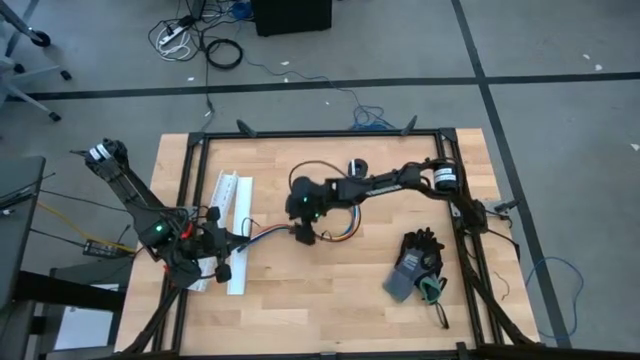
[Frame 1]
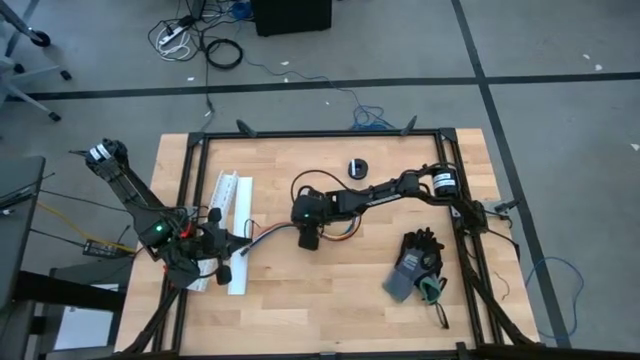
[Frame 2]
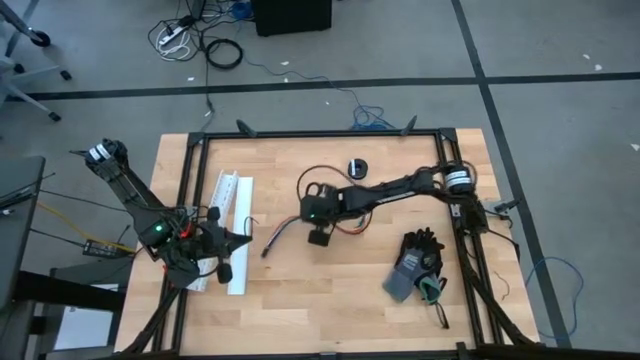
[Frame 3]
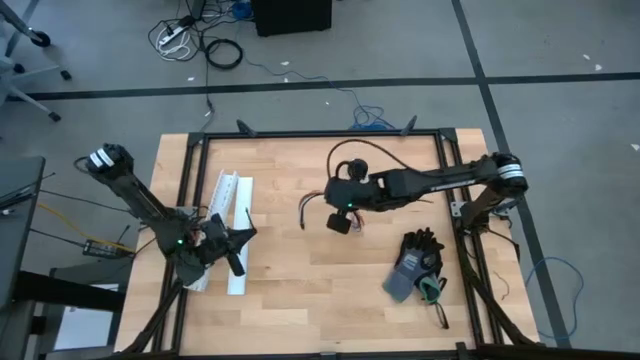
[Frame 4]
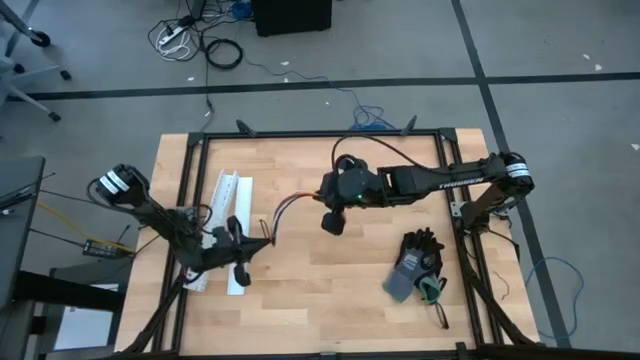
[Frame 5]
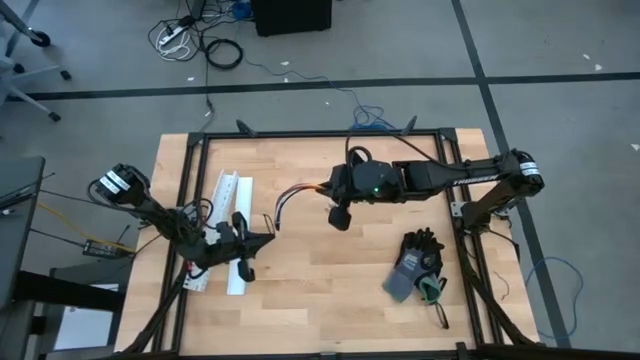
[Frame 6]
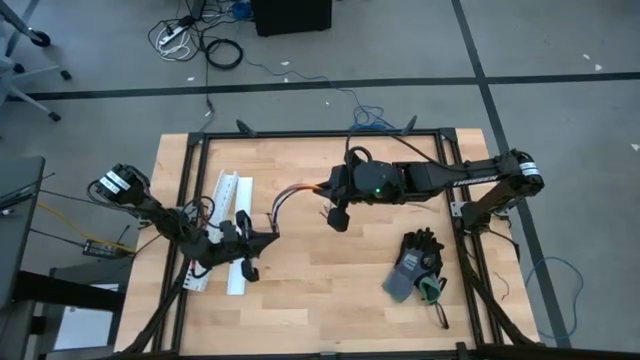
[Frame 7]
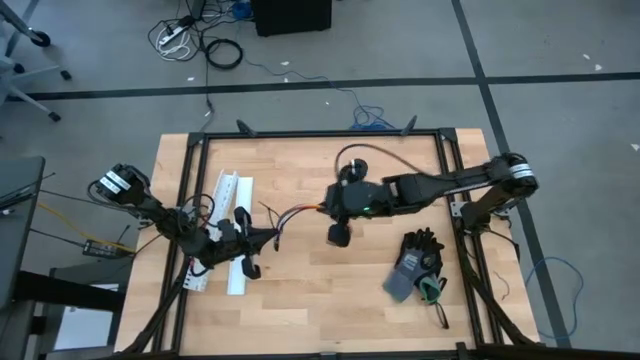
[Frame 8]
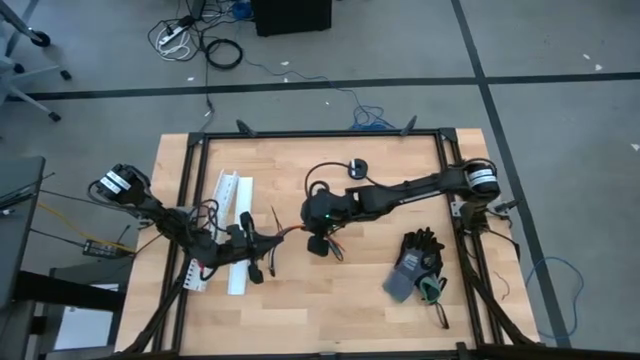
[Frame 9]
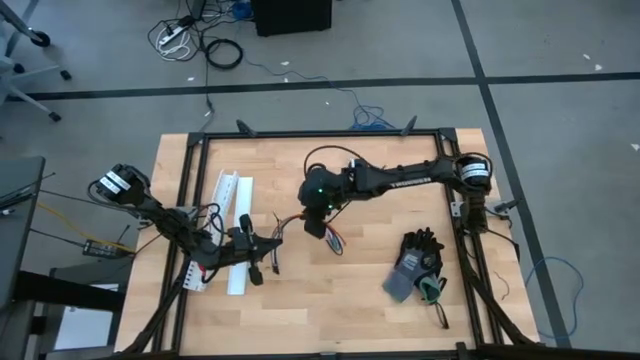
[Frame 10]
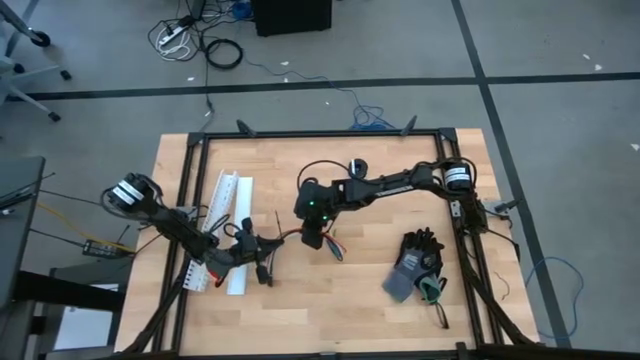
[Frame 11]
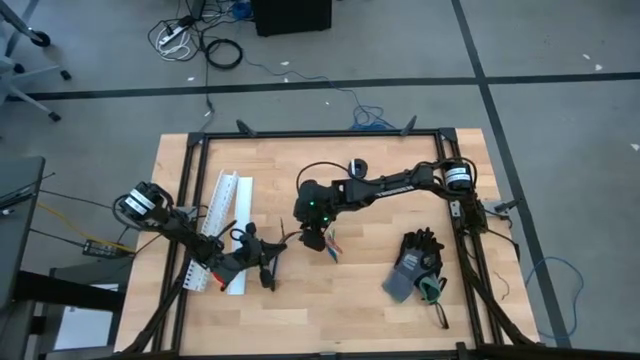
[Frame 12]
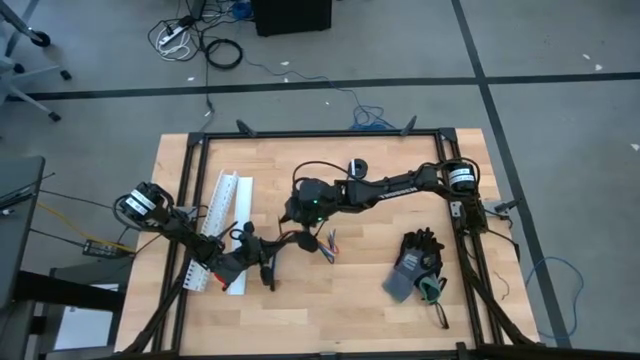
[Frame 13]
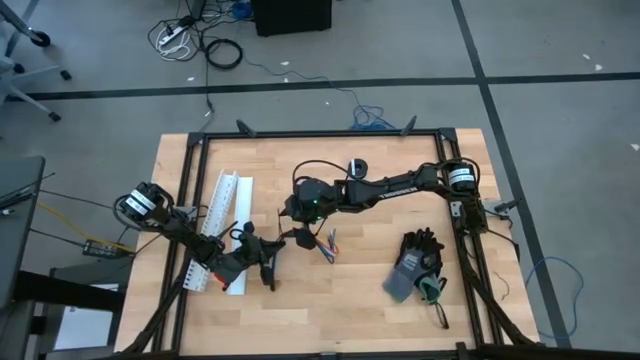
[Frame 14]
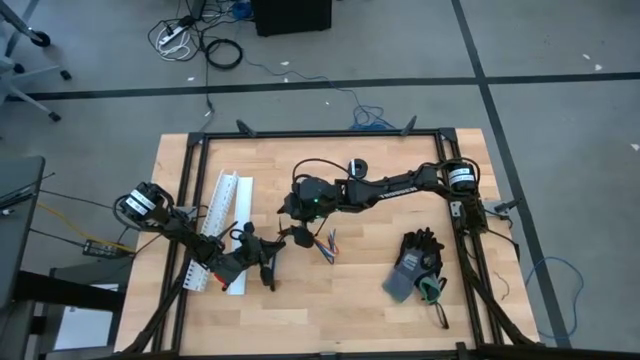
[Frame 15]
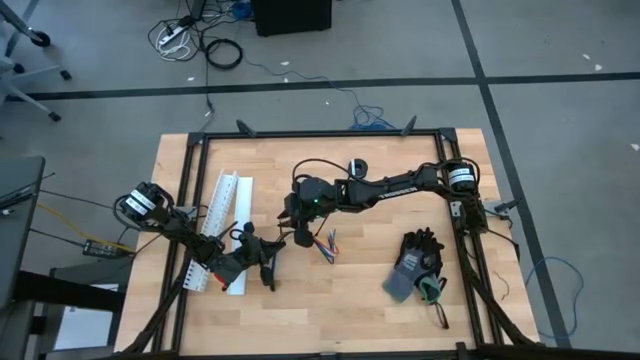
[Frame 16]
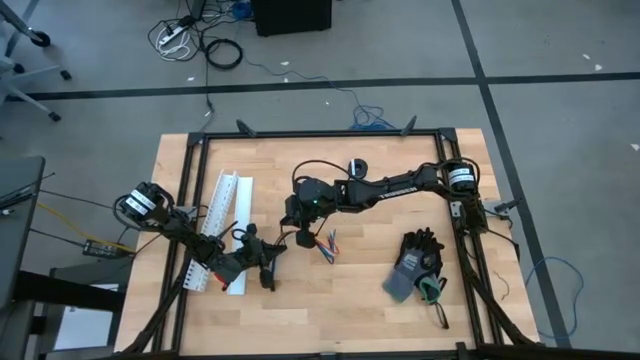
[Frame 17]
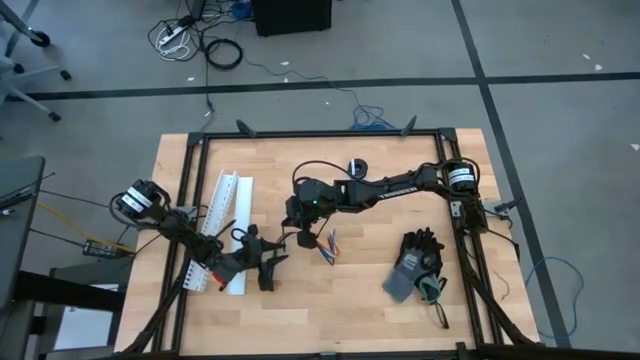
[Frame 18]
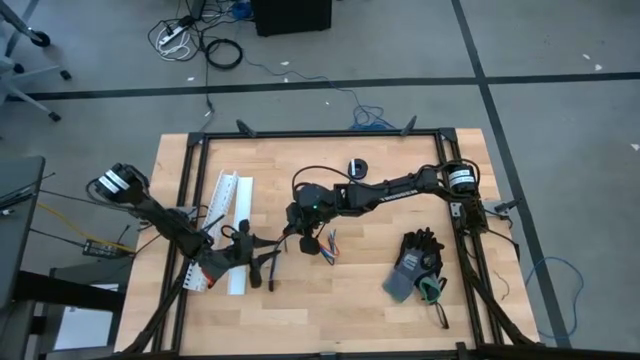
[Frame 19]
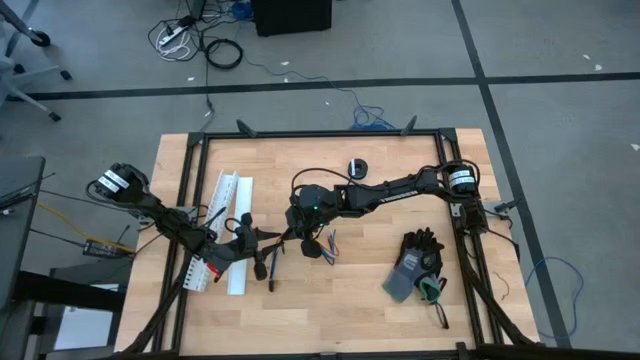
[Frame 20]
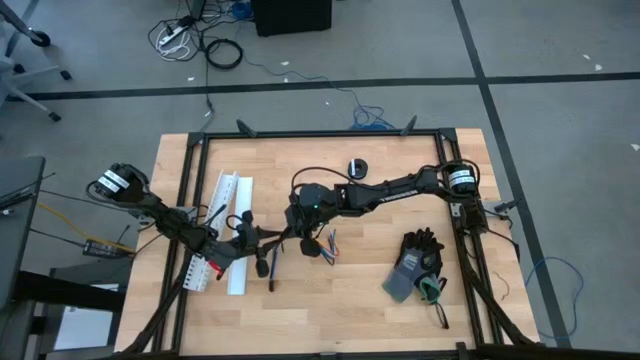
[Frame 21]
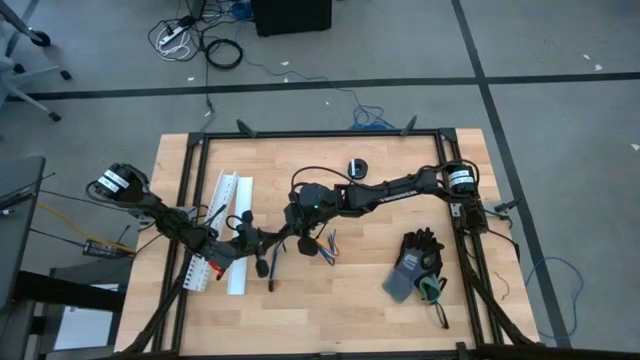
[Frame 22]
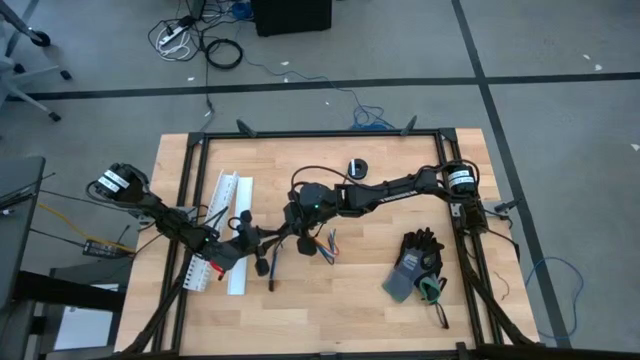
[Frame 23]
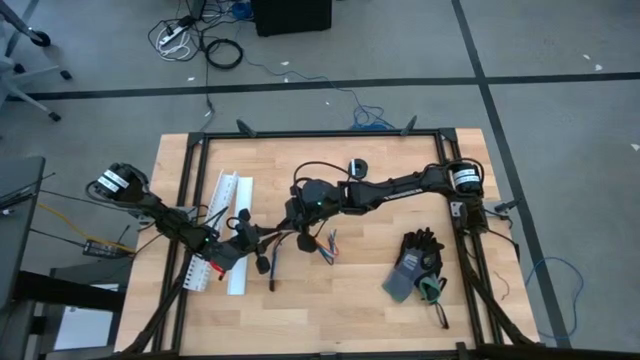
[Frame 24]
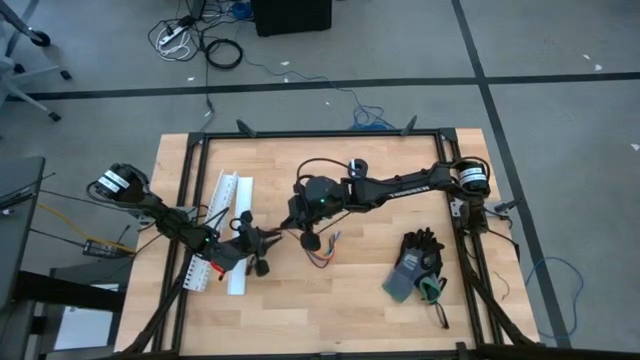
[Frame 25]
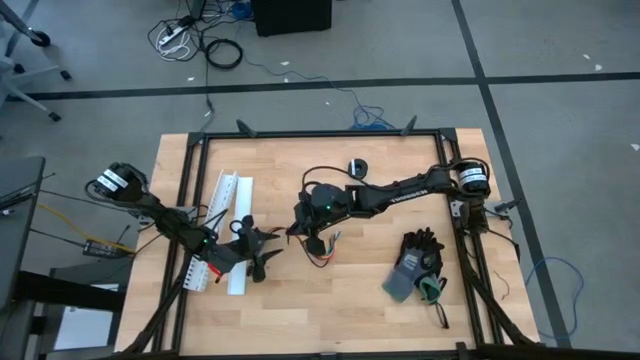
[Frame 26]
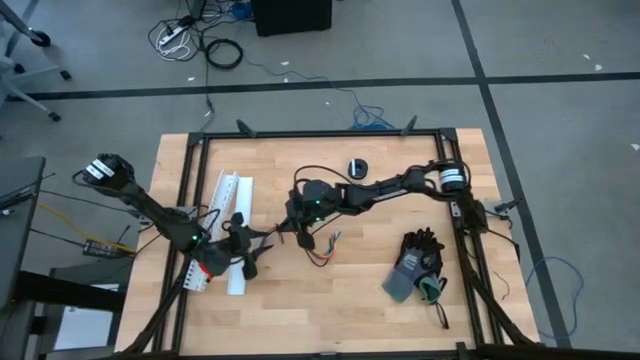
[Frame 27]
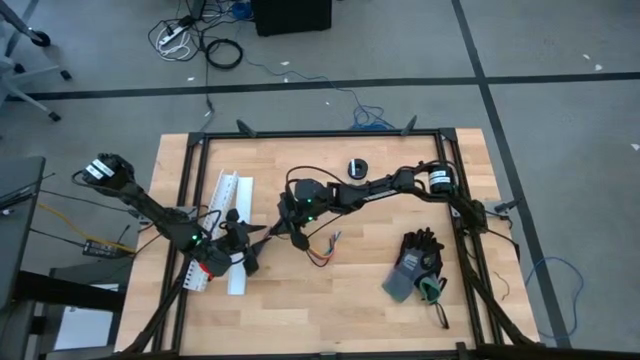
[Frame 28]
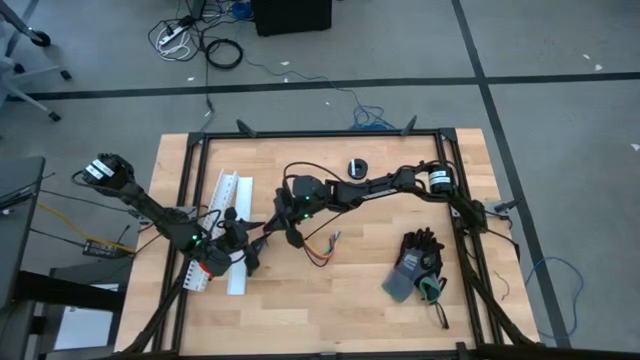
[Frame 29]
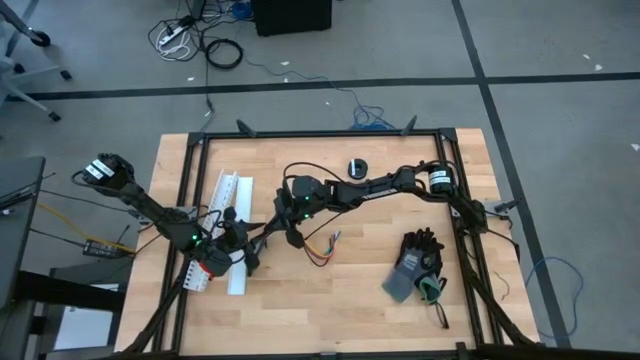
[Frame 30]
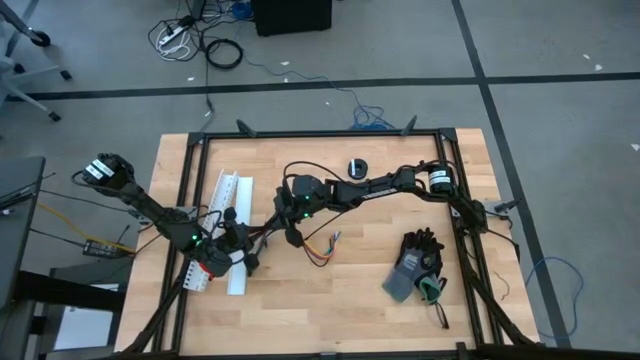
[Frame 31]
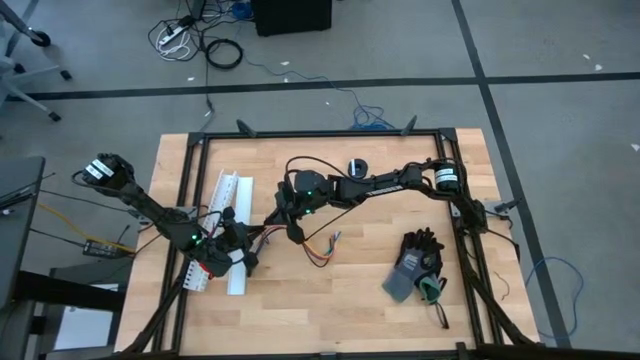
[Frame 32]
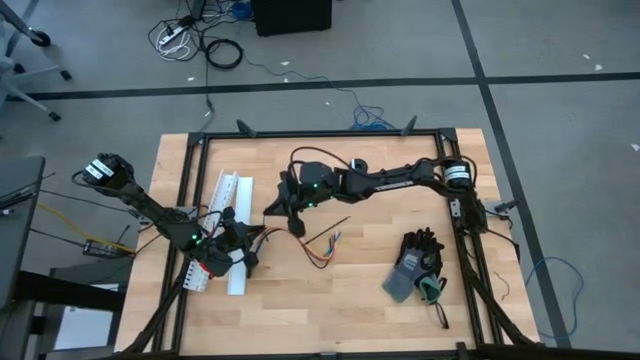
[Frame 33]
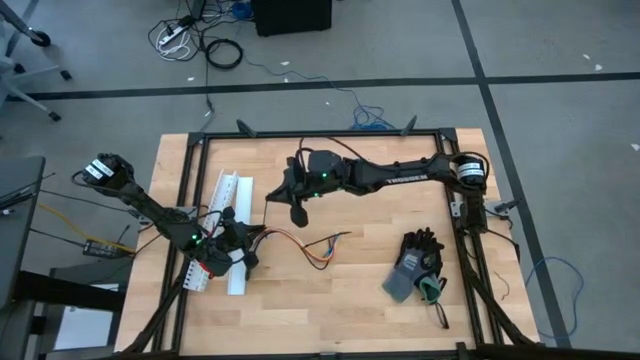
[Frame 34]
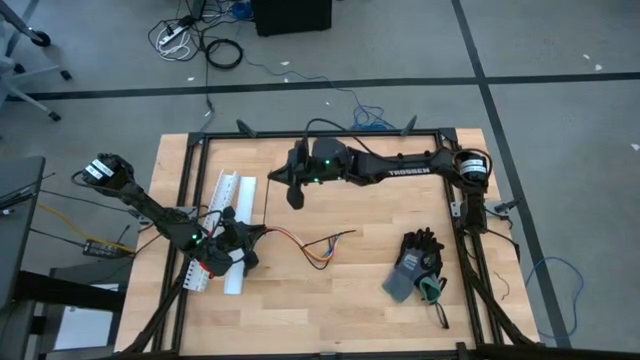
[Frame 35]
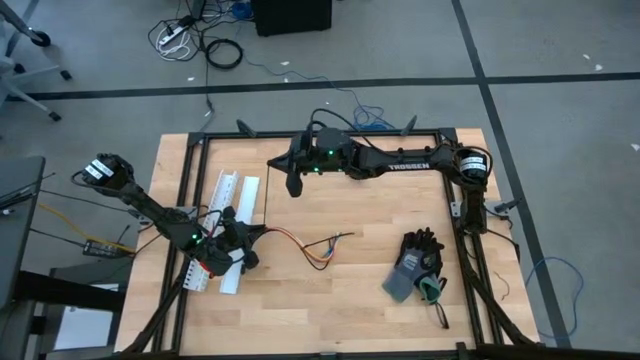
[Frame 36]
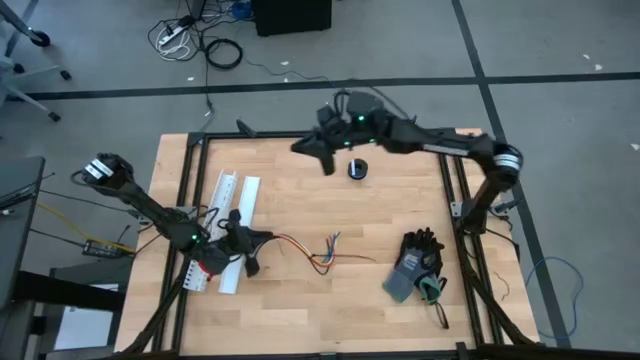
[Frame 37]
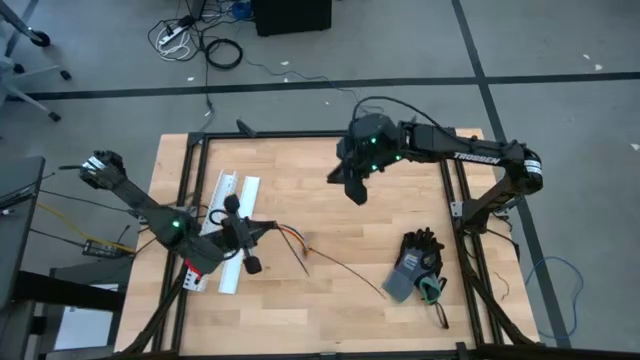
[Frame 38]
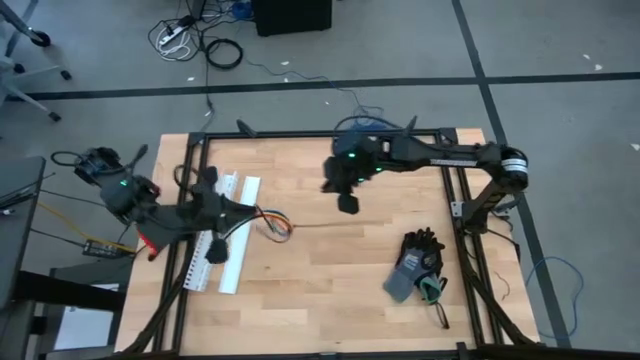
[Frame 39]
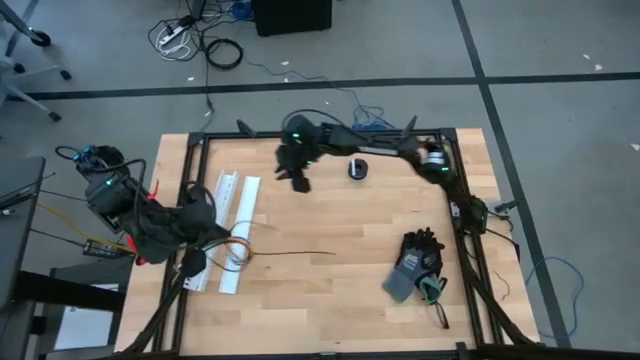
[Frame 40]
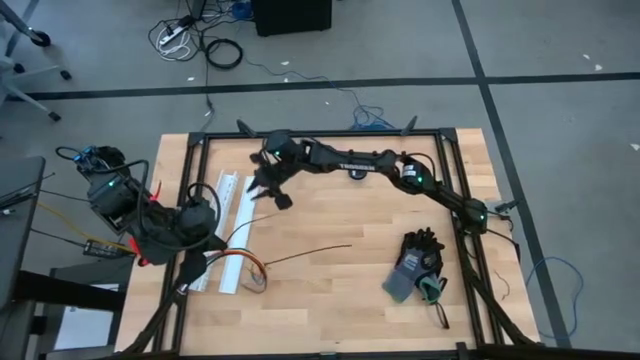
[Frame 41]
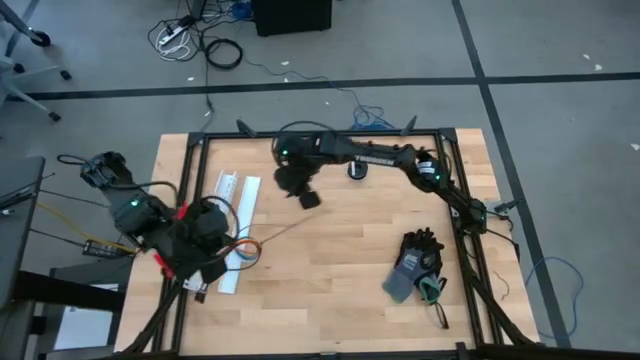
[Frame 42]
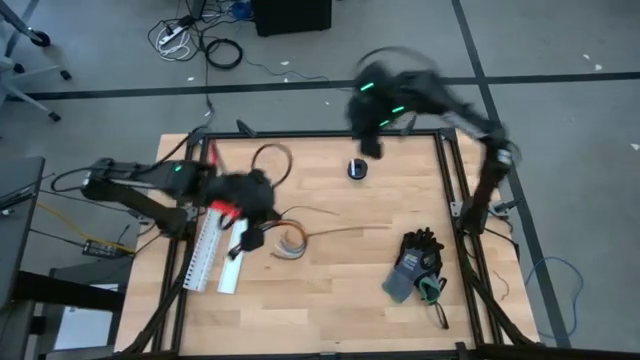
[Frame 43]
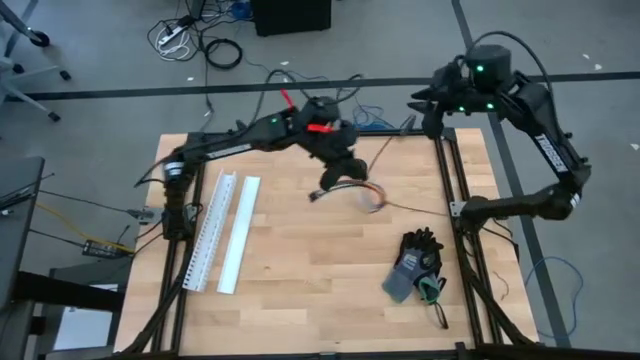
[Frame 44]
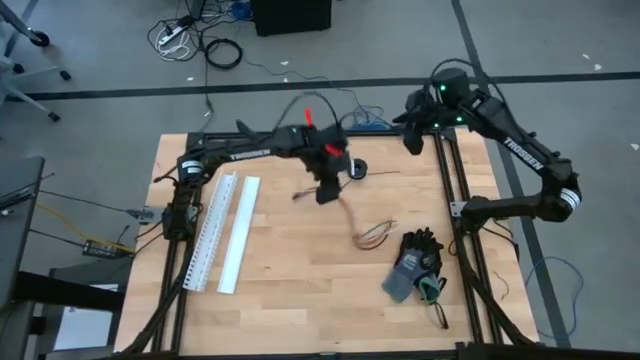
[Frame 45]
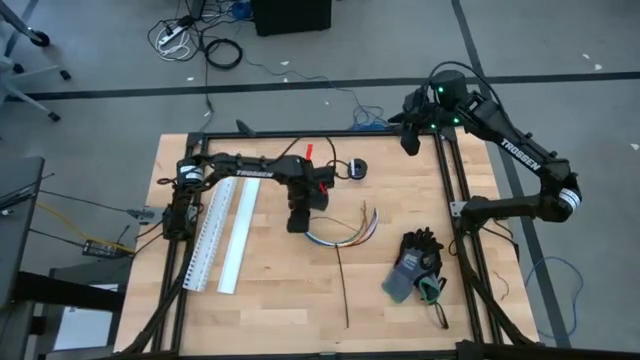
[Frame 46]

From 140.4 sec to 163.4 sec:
Task: Ziptie cables
Wrap the cables together using a ziptie
